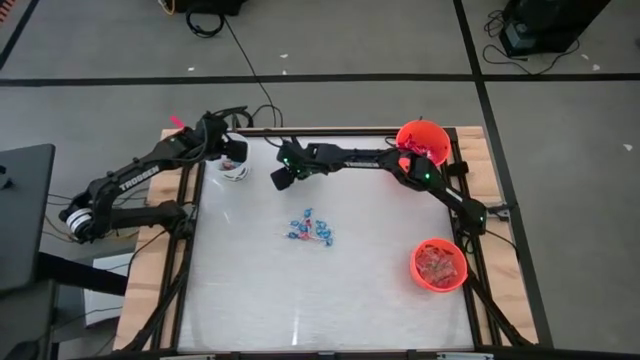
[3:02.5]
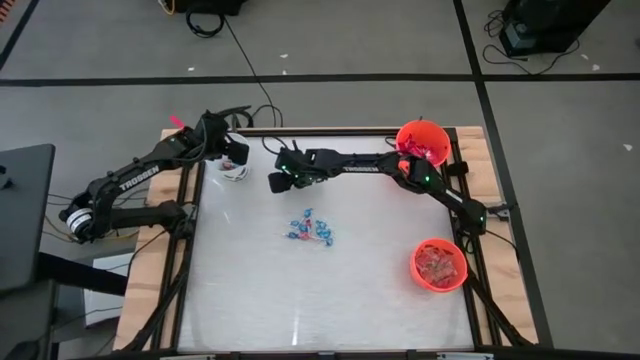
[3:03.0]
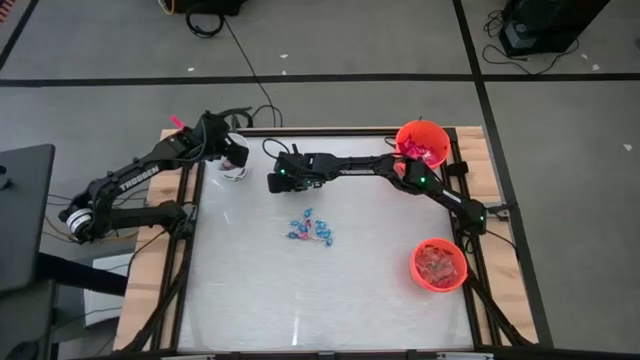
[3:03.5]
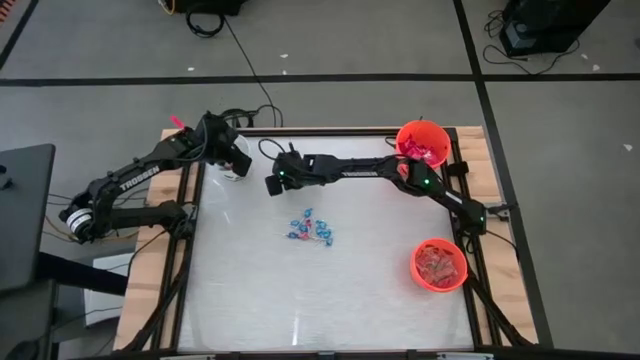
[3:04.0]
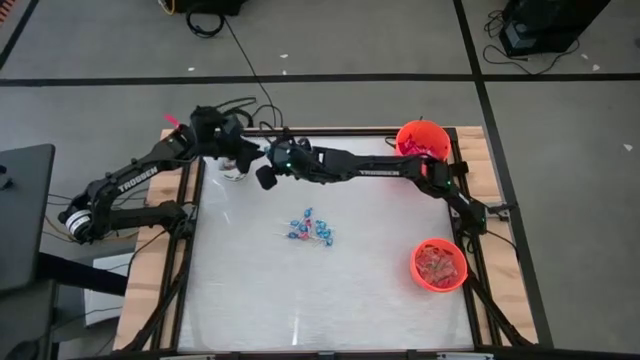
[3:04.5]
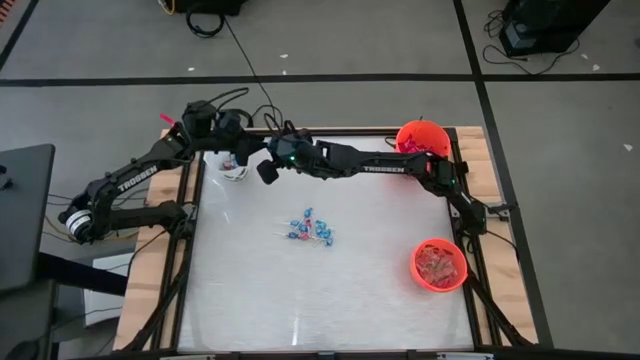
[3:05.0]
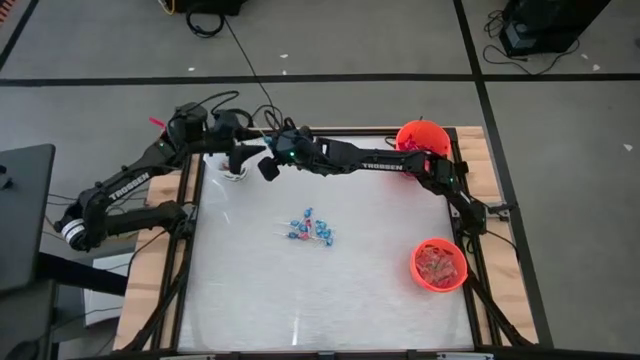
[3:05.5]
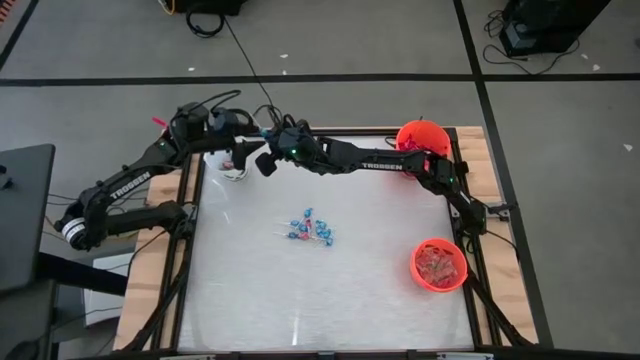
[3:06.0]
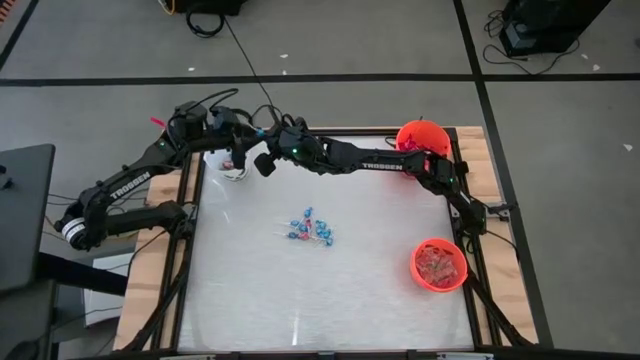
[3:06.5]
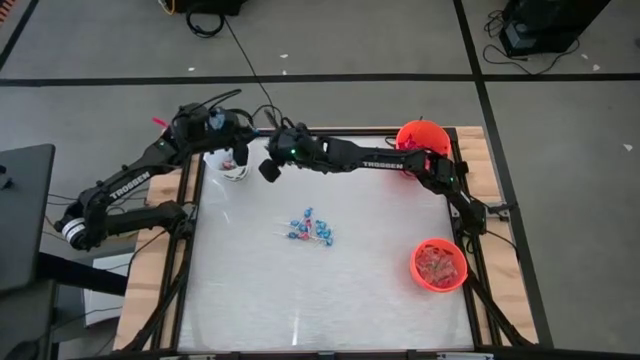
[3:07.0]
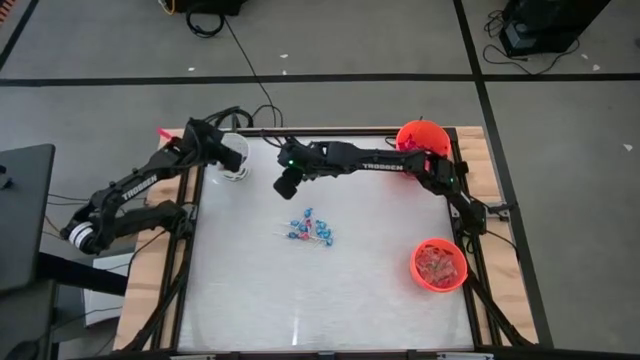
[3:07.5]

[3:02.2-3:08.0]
Task: Sort candy by brand, put in halloween buckets
Put the blue candy into the white bucket

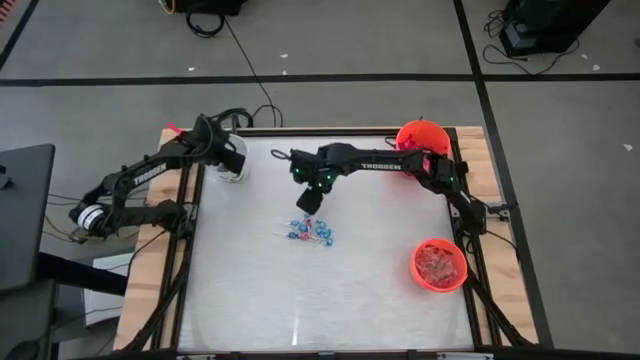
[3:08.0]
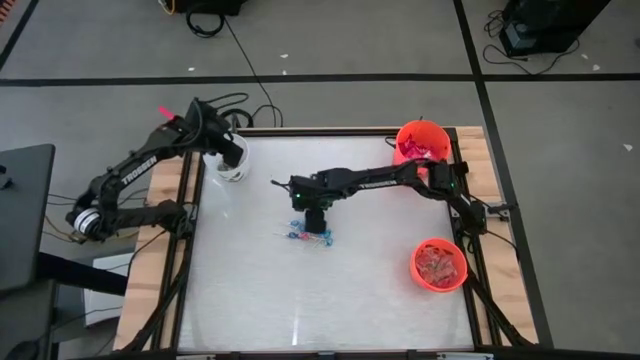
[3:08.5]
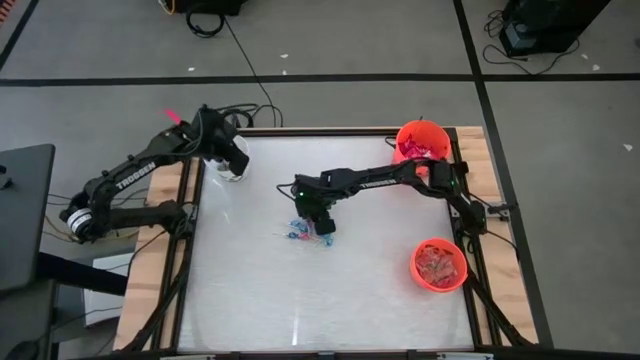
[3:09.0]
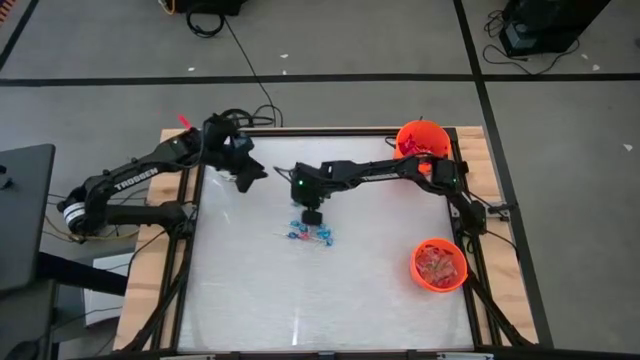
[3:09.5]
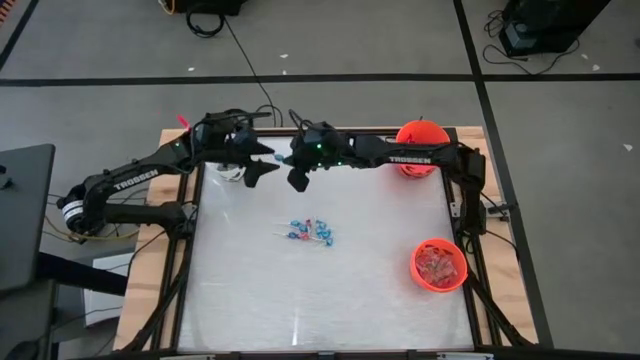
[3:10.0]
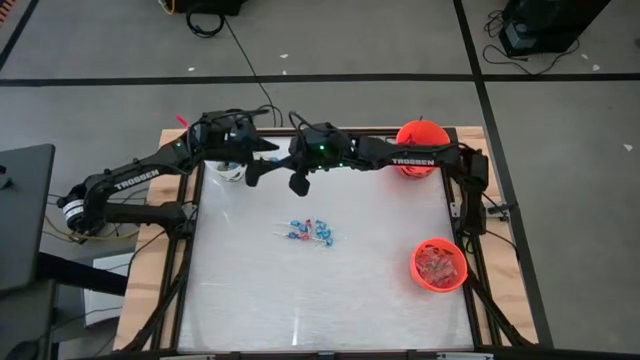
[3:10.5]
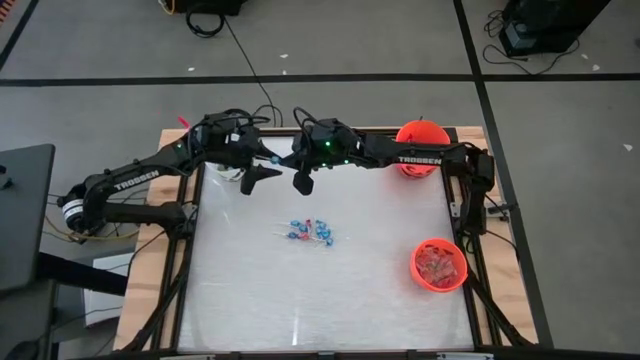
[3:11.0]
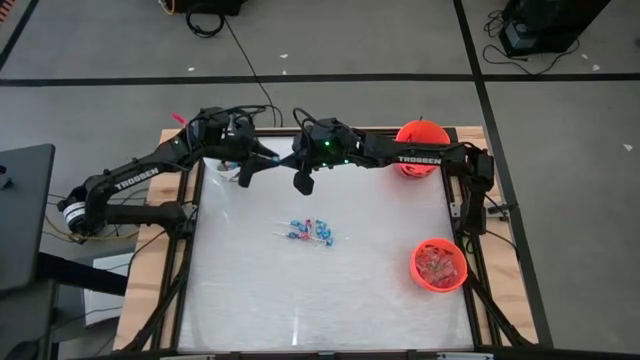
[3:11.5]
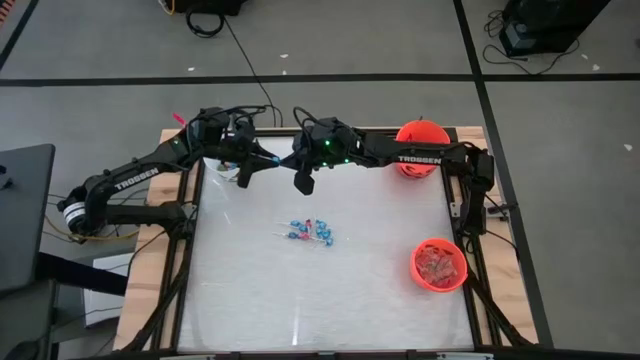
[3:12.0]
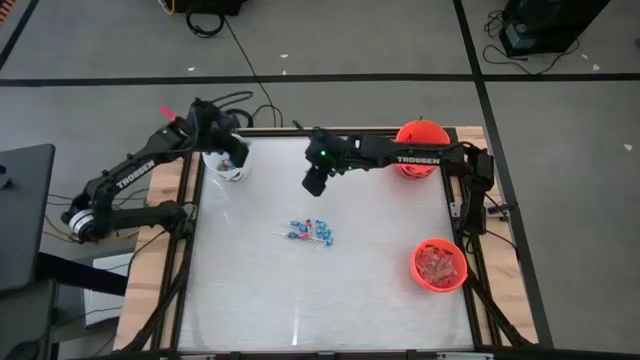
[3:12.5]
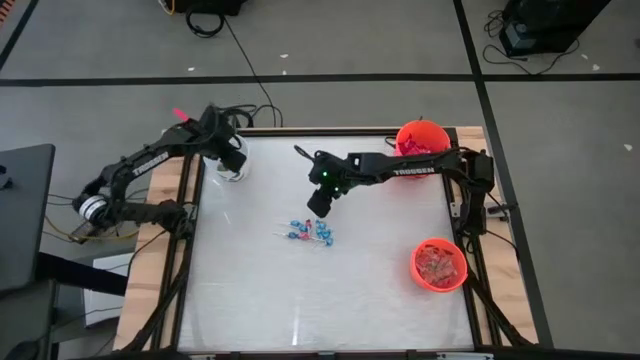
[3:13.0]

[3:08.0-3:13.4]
Put the blue candy into the white bucket

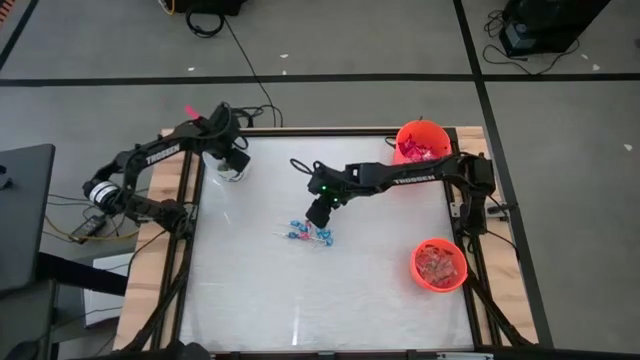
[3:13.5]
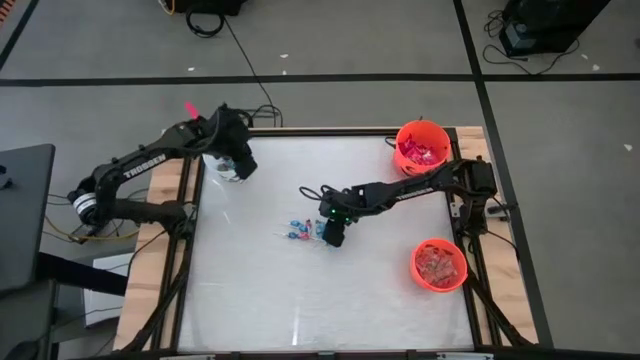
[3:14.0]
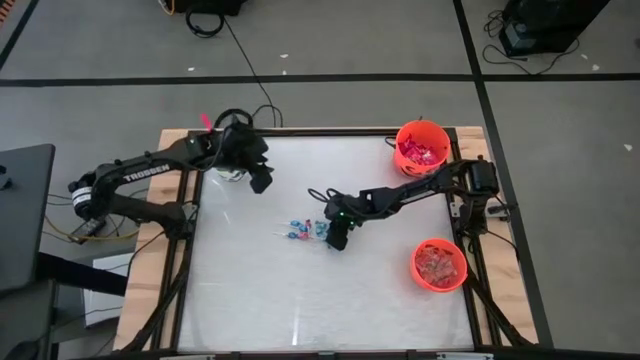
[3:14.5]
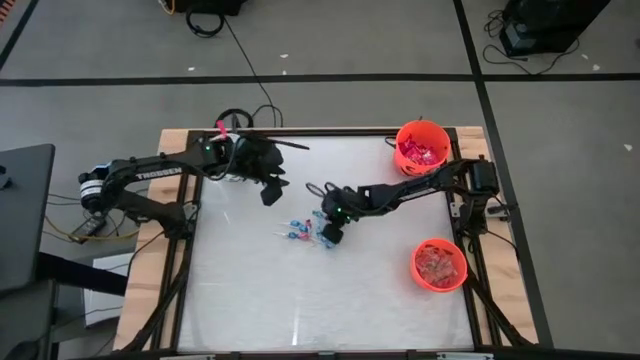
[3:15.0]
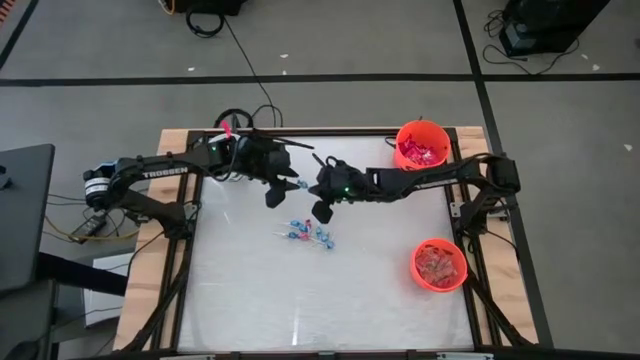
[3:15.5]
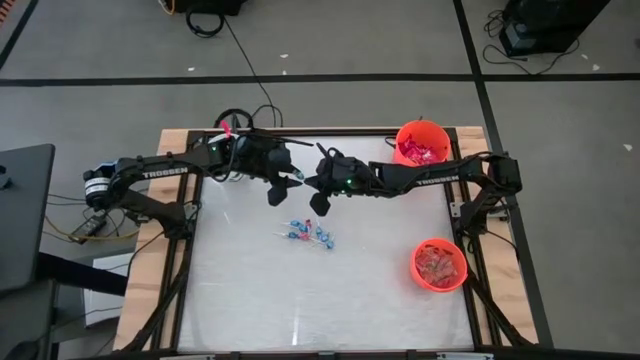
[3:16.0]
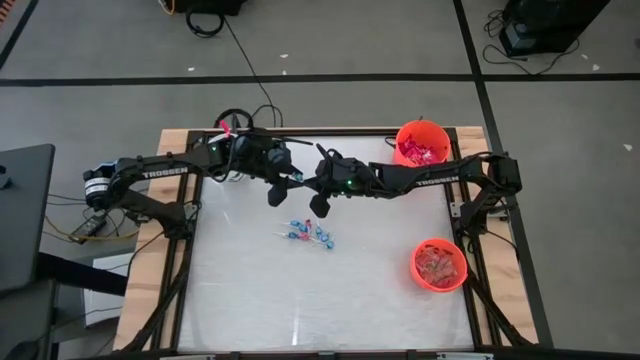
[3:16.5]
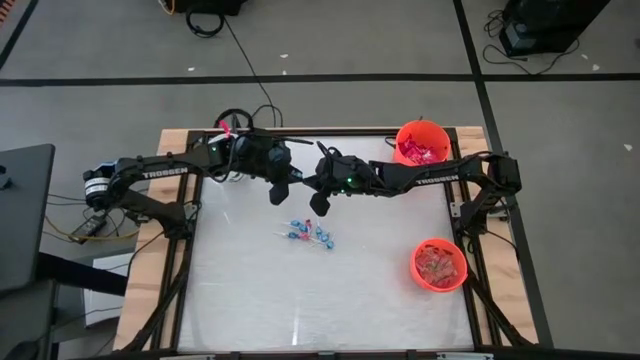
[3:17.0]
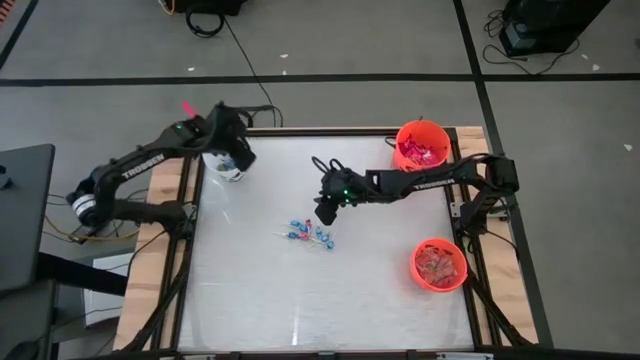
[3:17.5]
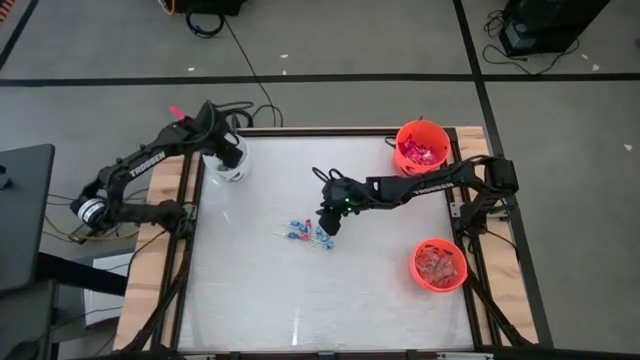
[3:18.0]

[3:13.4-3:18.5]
Put the blue candy into the white bucket

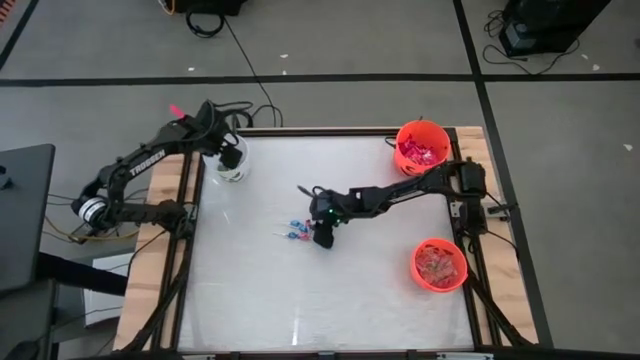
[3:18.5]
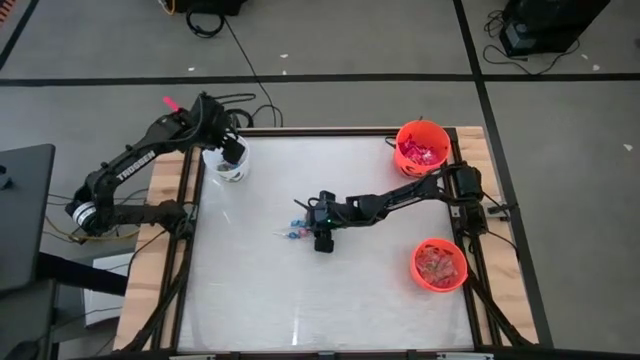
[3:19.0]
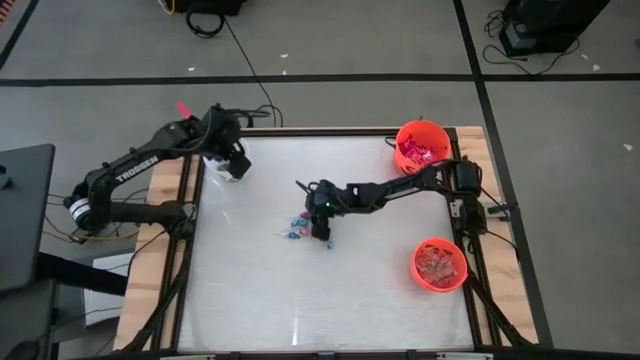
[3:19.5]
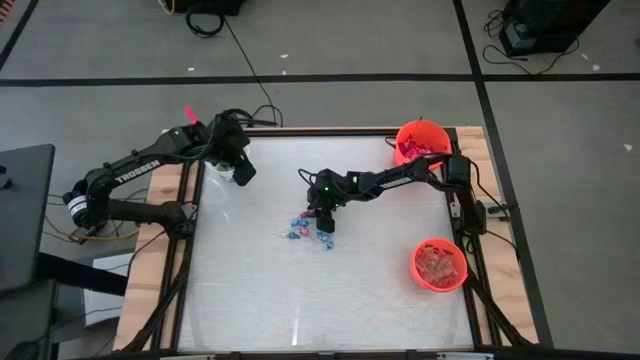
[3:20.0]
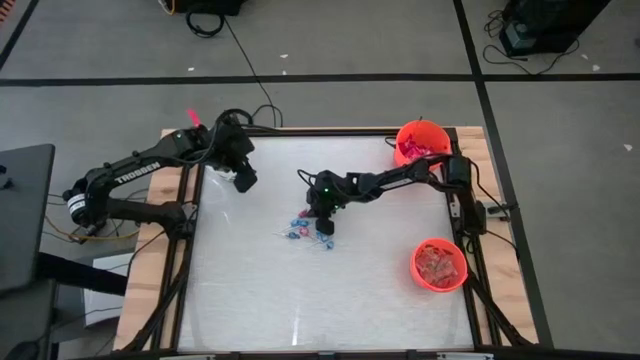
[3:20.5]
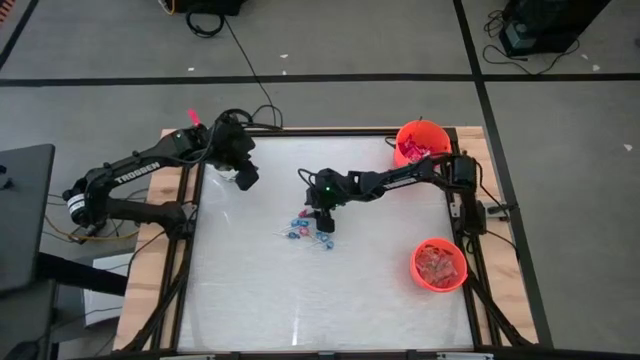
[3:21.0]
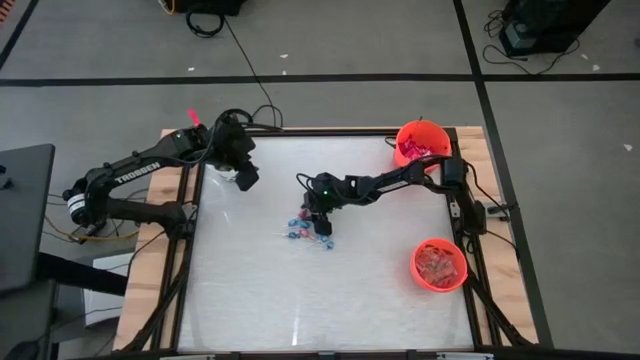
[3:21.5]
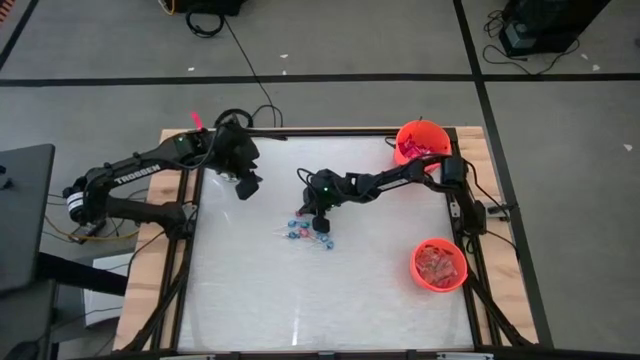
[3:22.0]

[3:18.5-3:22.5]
Put the red candy into the white bucket
